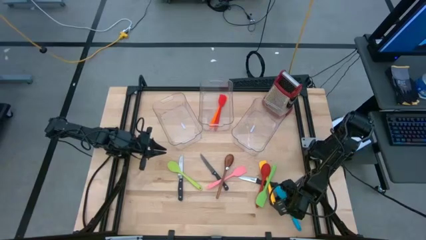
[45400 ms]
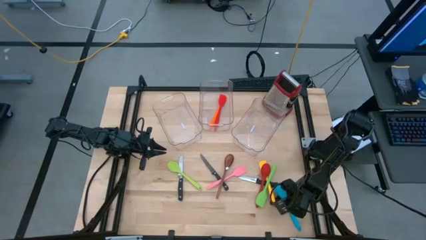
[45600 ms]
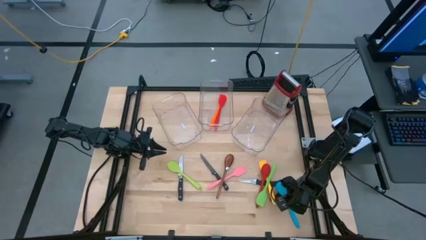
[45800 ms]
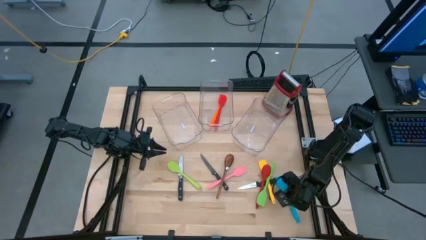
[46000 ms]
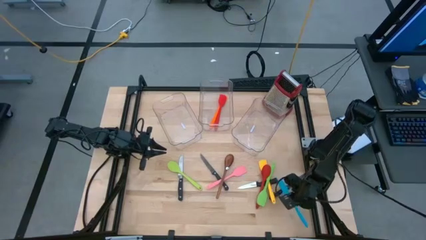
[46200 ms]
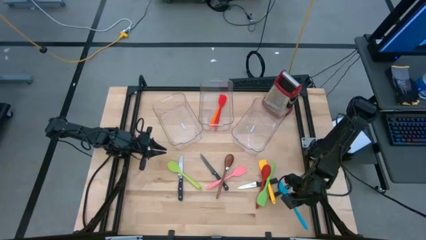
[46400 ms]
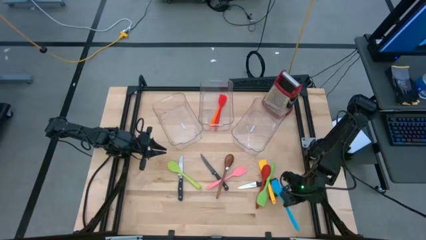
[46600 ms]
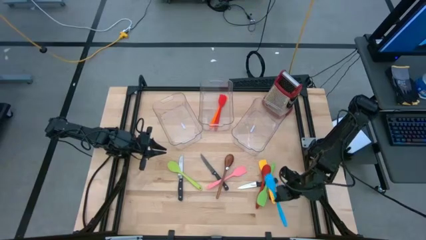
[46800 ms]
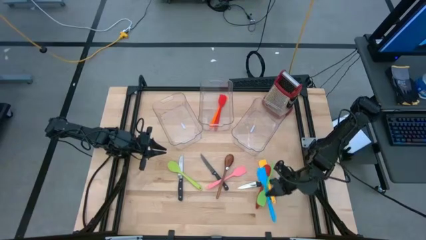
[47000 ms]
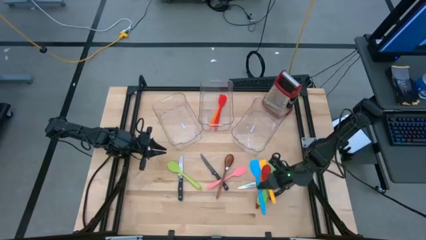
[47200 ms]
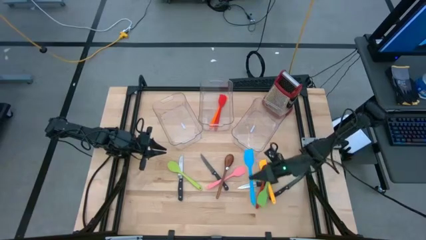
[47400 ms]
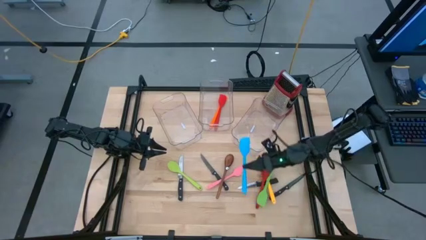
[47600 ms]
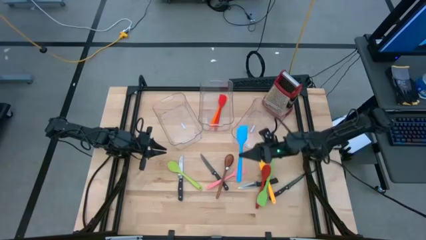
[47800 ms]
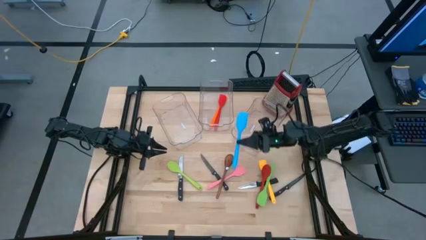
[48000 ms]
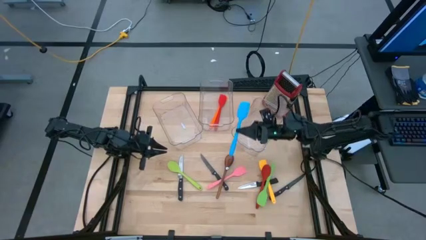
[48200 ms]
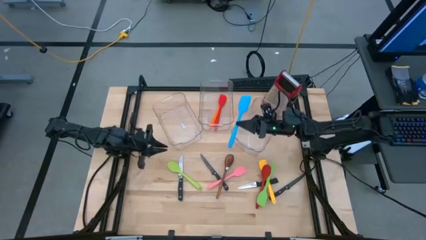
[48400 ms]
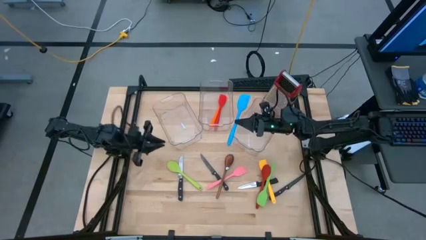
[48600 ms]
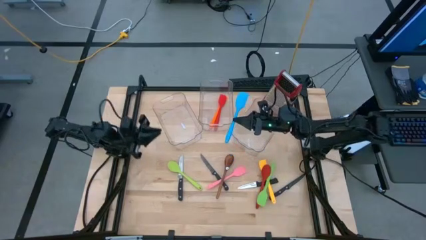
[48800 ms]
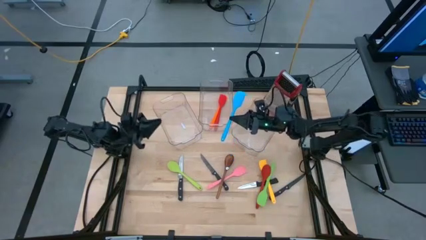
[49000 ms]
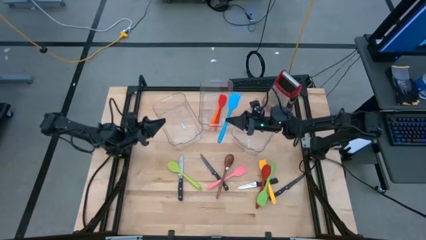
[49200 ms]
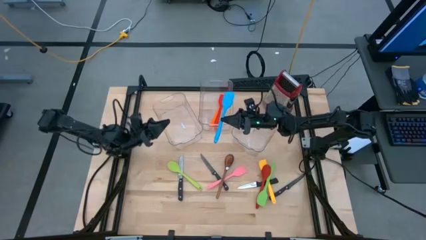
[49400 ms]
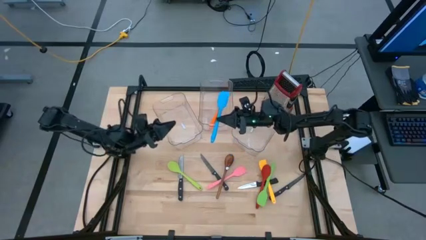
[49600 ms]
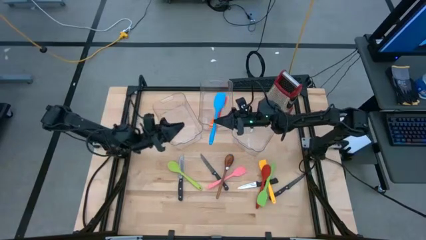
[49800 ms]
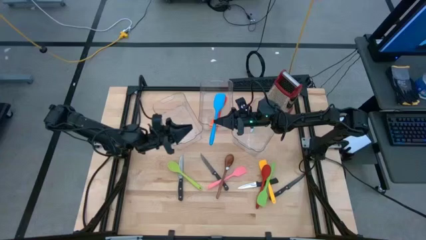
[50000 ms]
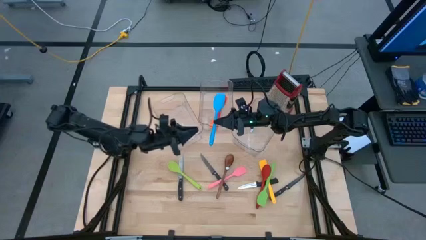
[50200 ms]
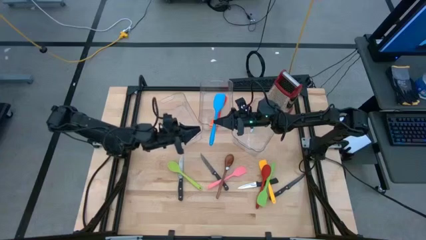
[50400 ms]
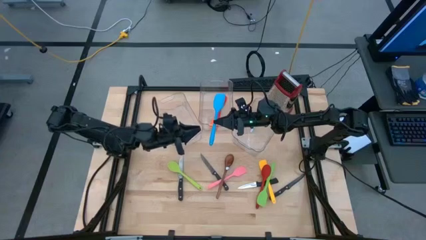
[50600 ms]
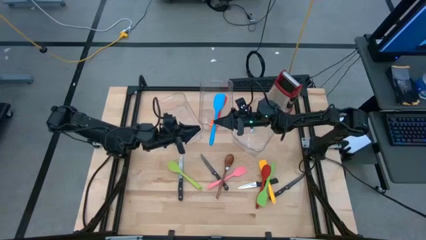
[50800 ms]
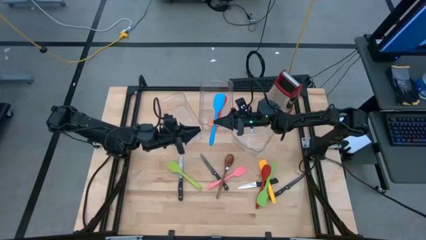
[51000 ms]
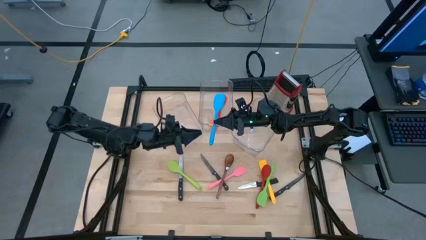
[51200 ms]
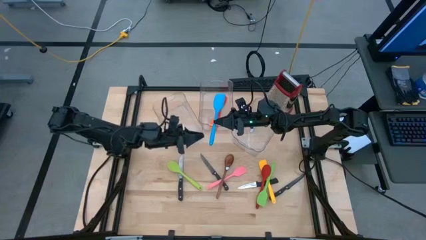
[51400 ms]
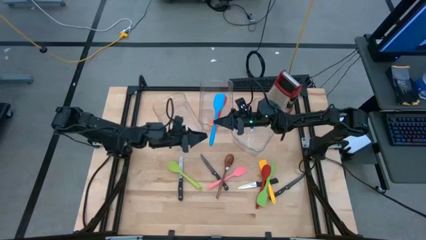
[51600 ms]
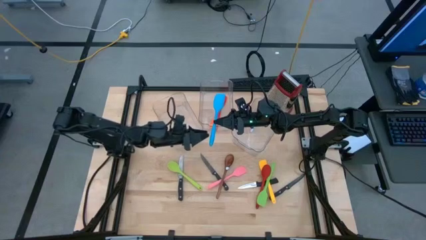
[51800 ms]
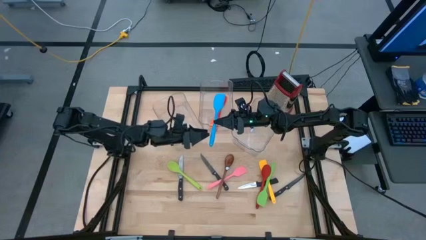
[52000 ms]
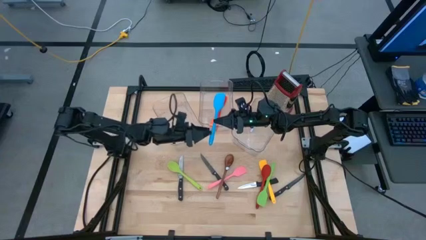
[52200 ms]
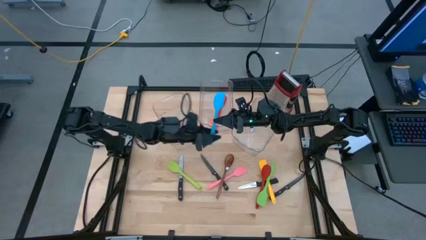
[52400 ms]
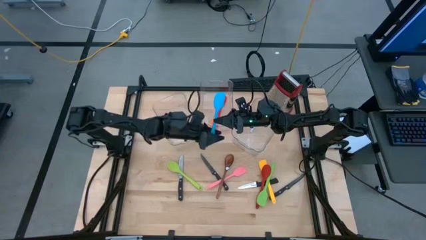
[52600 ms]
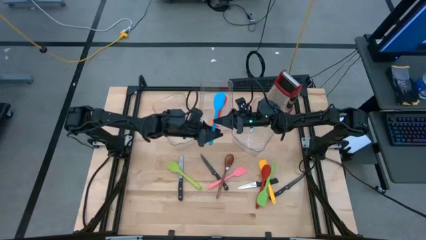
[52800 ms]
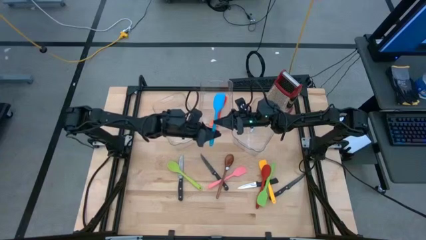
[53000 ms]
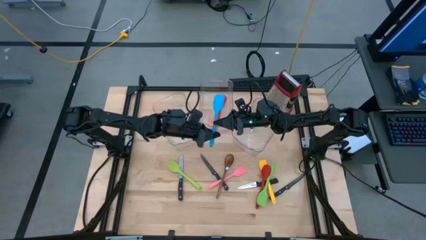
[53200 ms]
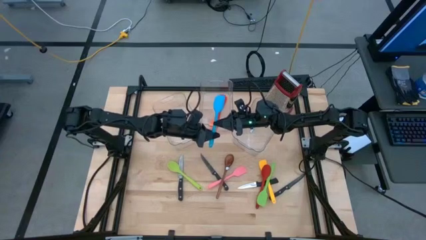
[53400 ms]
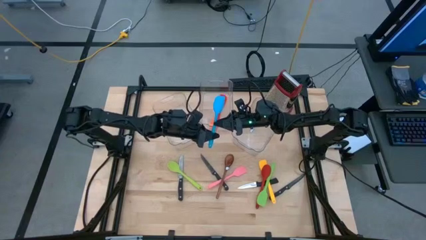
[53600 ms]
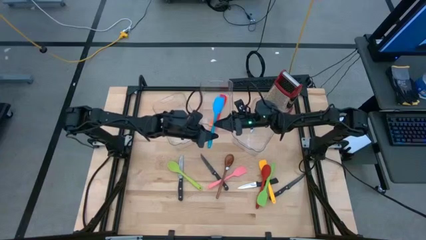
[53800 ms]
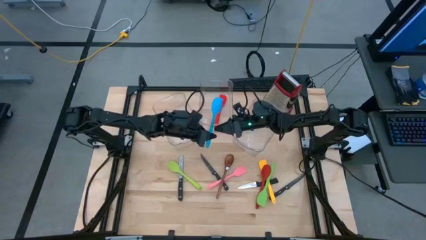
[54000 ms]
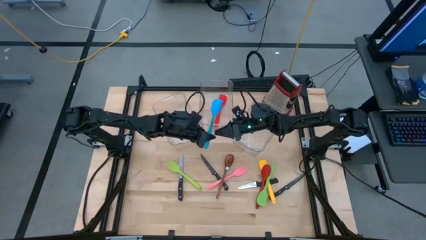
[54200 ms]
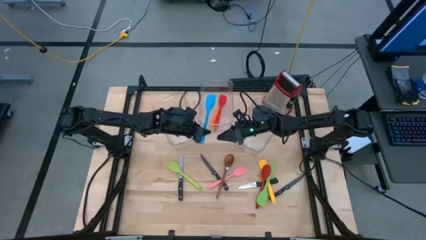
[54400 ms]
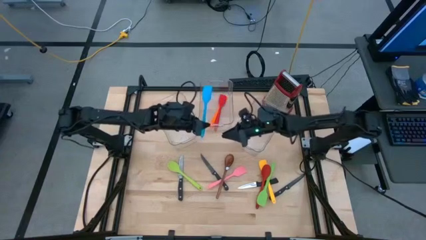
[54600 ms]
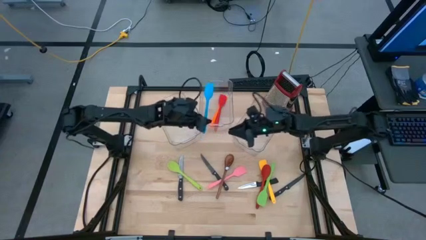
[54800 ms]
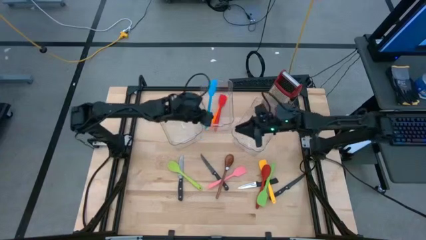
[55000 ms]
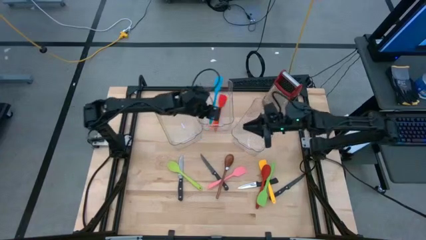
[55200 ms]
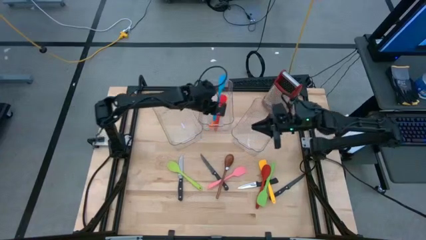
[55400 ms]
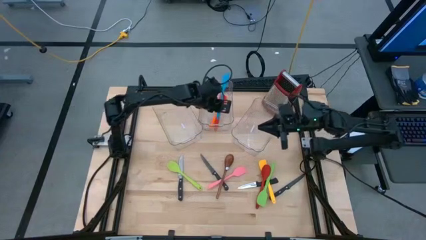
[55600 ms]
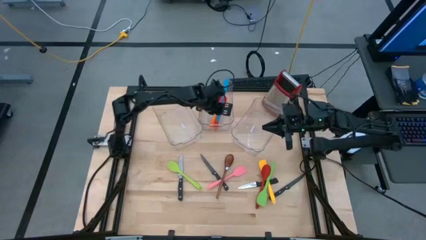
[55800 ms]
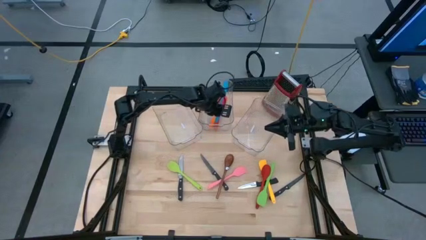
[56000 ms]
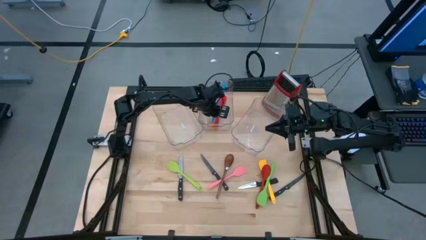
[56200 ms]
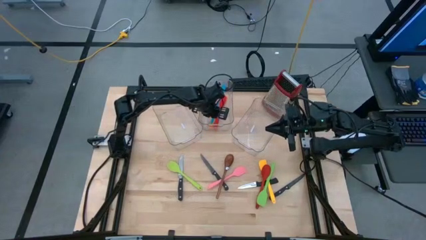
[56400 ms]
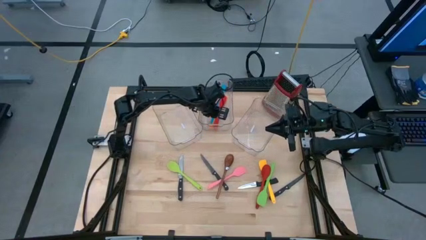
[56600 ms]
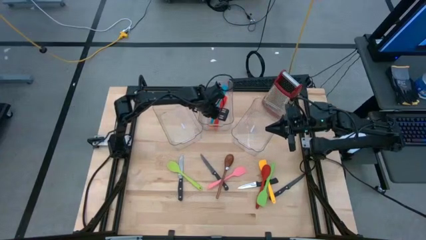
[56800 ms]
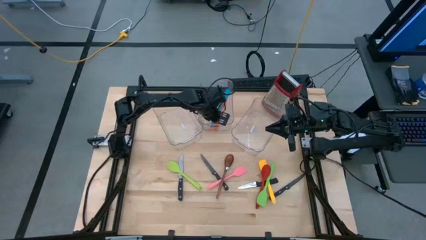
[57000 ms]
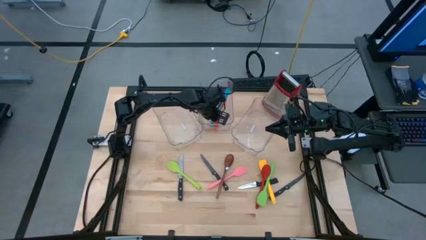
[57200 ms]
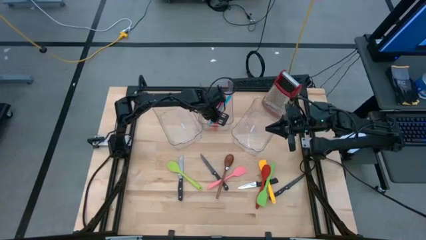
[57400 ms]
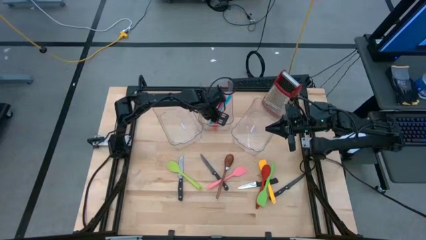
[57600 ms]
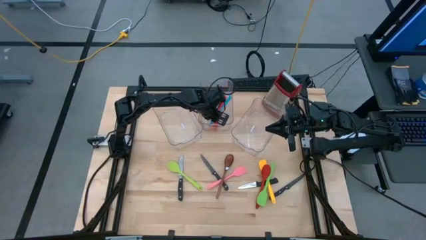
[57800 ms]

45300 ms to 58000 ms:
Task: Pick & Place Kitchen Items
Put the blue spatula in the middle bin

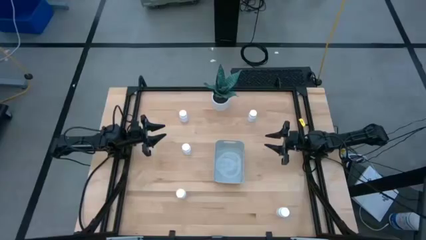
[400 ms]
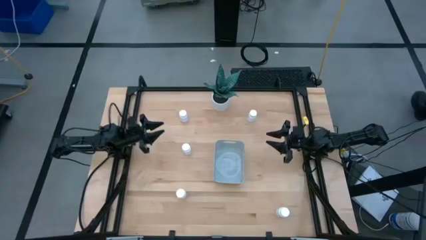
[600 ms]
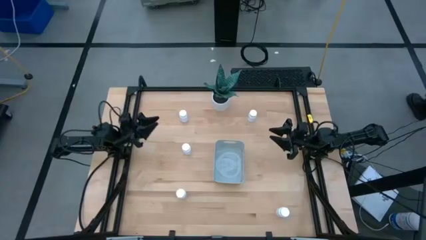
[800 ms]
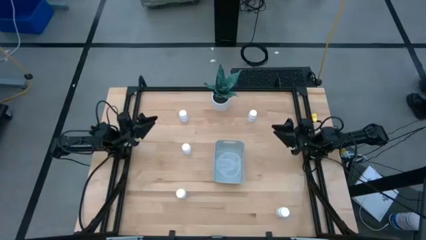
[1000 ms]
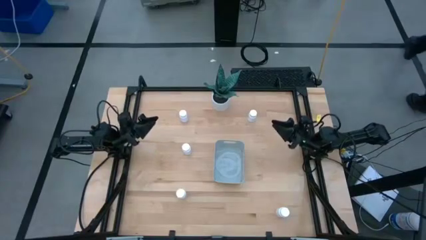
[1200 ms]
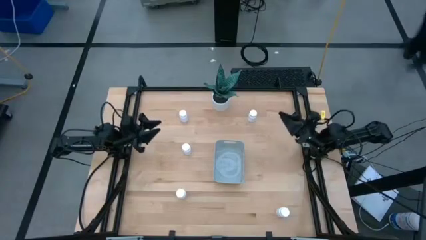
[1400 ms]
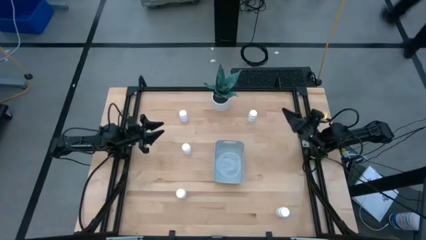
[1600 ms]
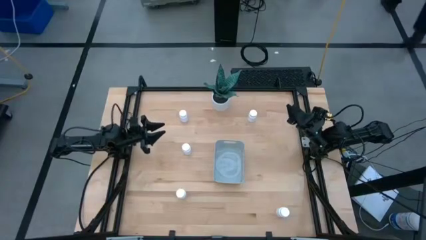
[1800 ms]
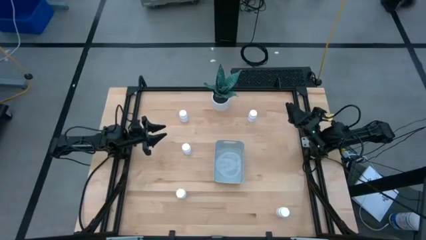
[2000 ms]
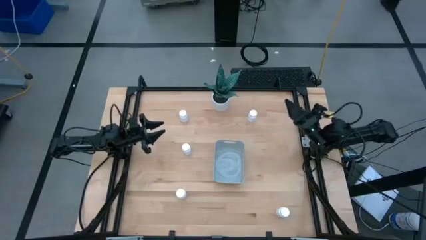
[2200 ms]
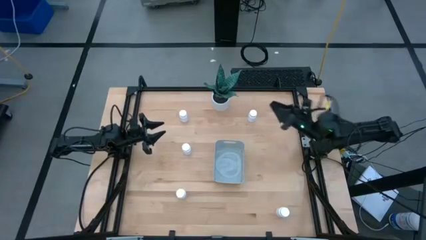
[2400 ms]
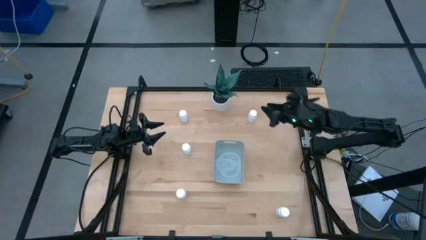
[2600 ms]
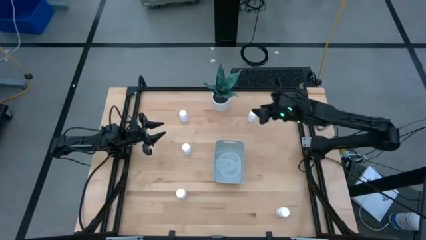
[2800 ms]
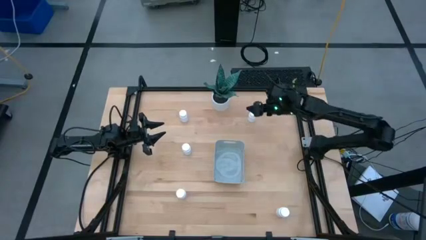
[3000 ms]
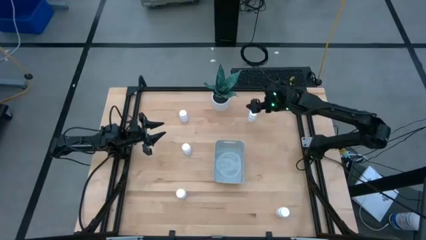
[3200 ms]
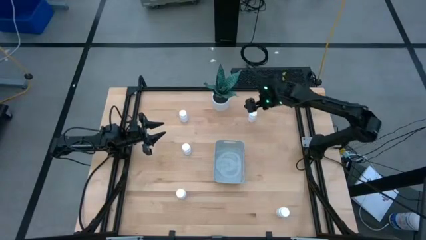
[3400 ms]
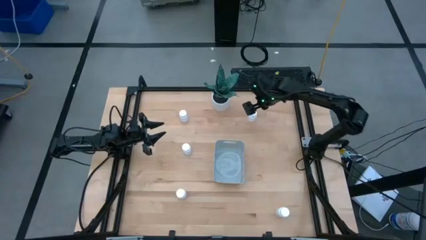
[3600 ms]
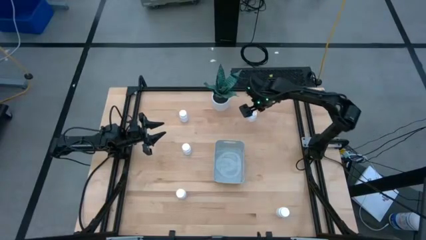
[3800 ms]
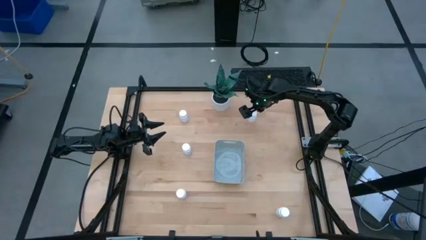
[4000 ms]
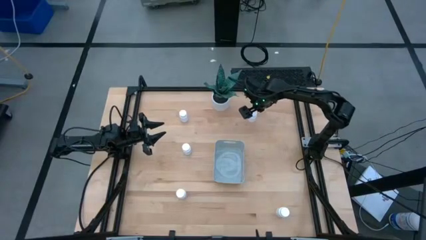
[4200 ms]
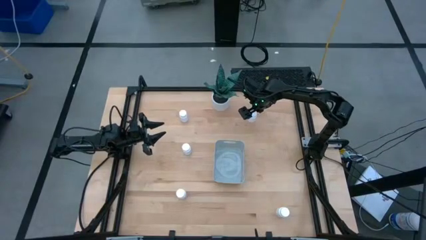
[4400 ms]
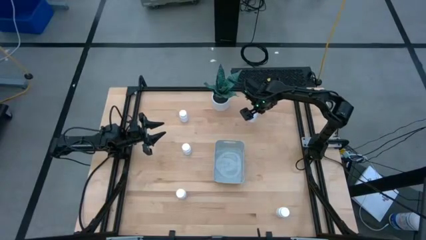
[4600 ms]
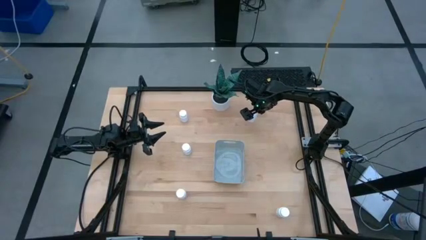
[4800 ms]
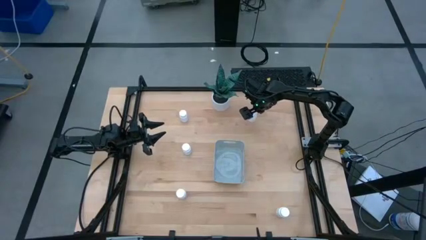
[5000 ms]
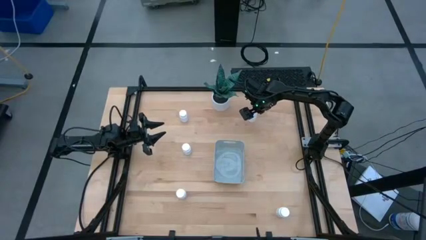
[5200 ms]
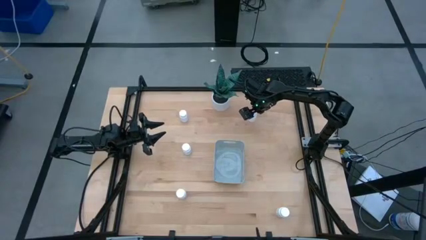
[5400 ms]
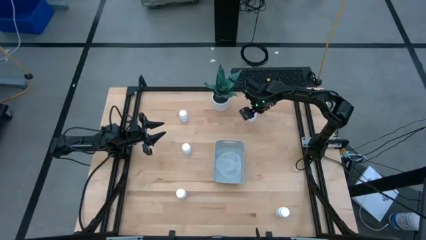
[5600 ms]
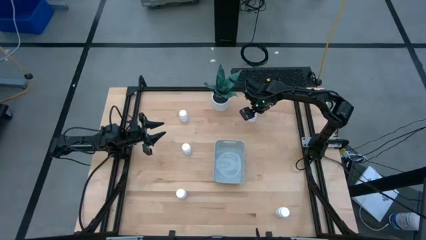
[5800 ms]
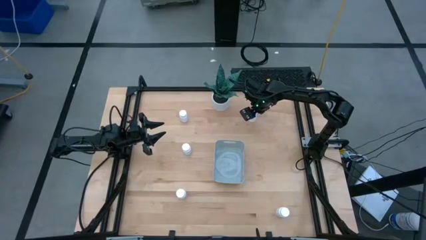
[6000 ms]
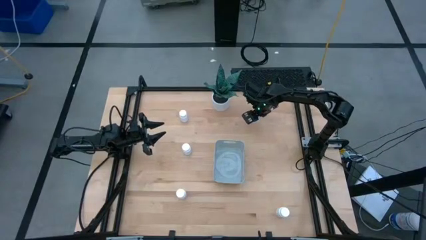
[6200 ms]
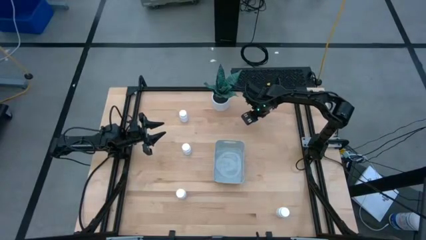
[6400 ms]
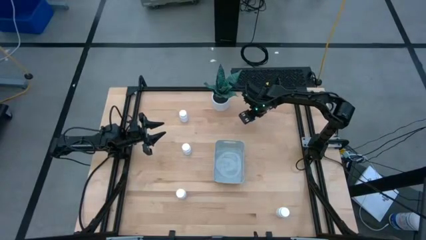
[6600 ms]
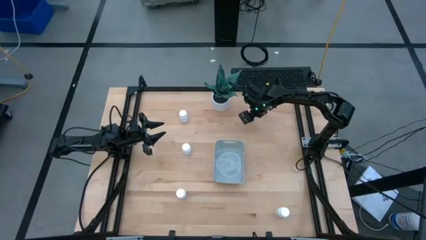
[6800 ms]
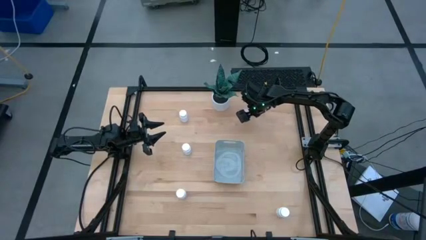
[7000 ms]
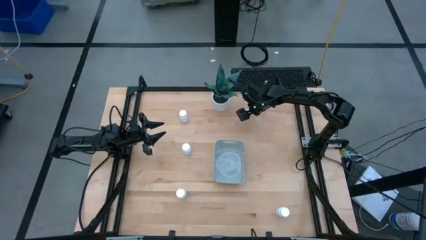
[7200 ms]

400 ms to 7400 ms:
Task: Pick and place pill bottles into a basket
Put the white pill bottle into the gray bin
